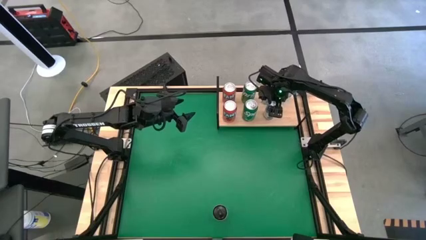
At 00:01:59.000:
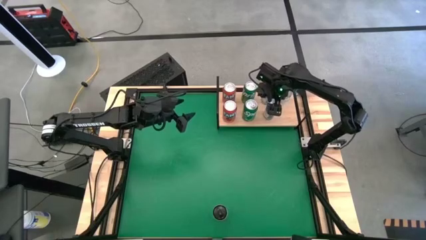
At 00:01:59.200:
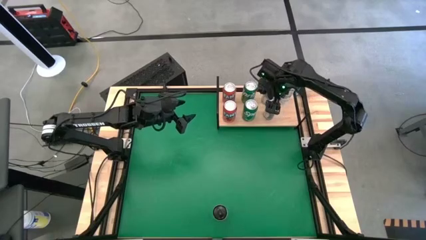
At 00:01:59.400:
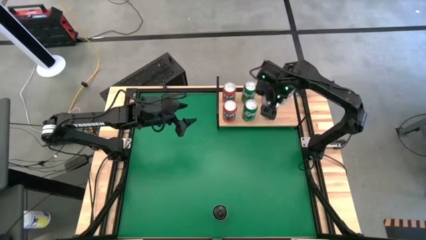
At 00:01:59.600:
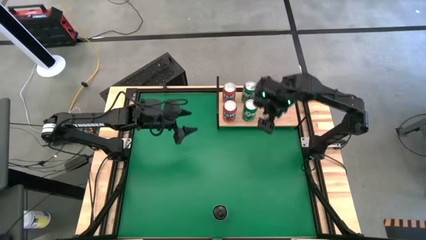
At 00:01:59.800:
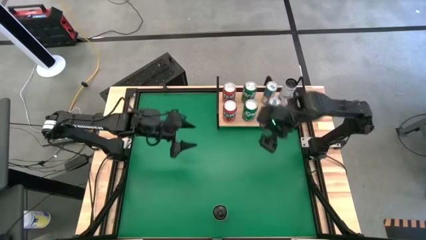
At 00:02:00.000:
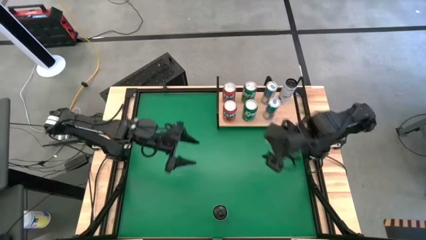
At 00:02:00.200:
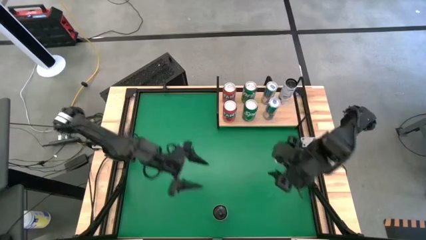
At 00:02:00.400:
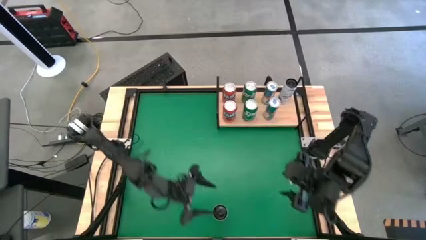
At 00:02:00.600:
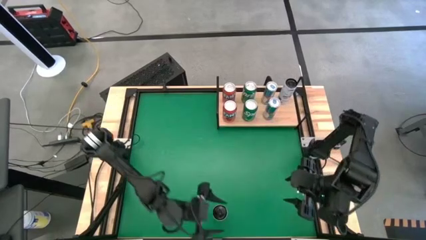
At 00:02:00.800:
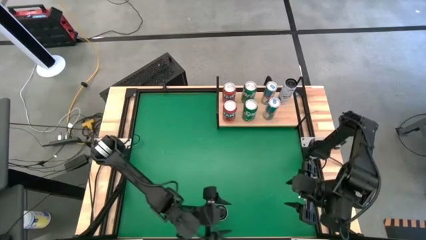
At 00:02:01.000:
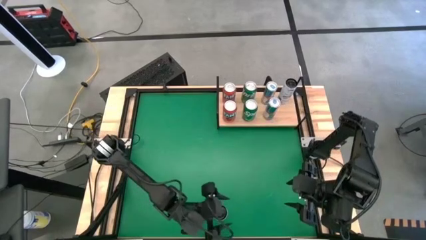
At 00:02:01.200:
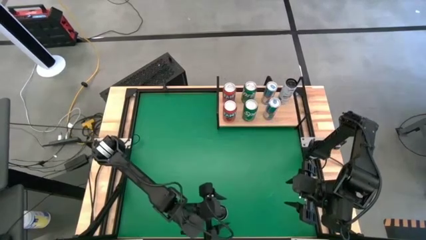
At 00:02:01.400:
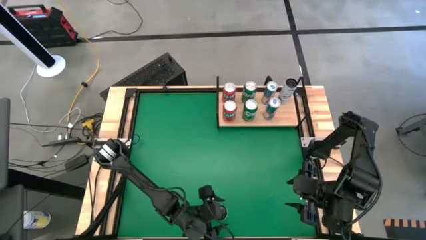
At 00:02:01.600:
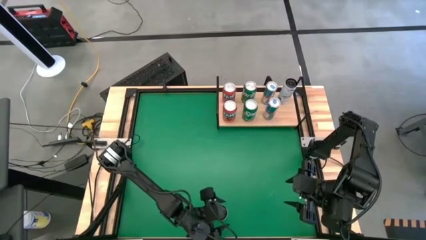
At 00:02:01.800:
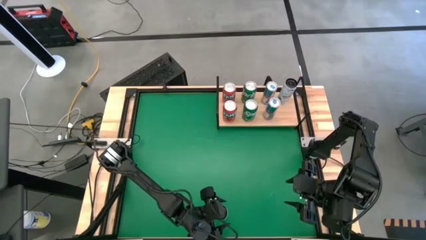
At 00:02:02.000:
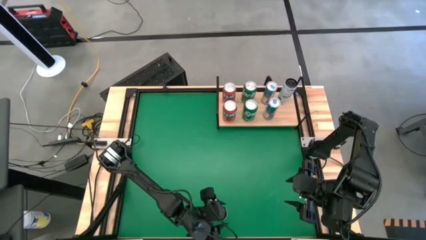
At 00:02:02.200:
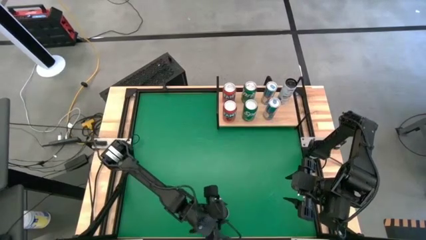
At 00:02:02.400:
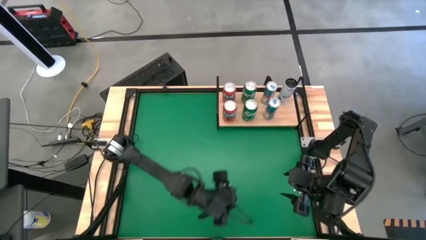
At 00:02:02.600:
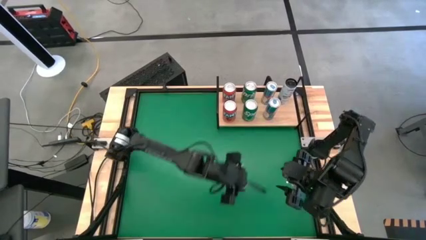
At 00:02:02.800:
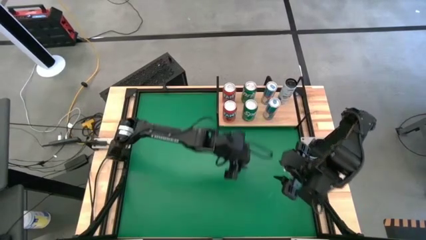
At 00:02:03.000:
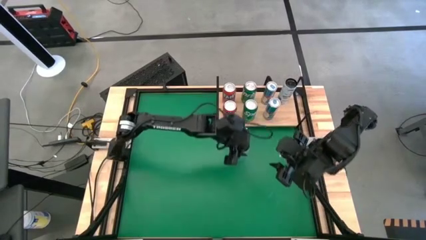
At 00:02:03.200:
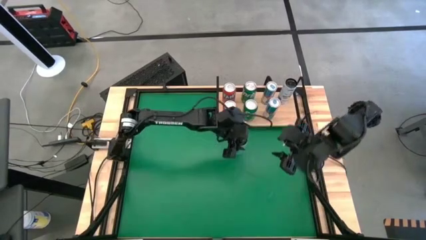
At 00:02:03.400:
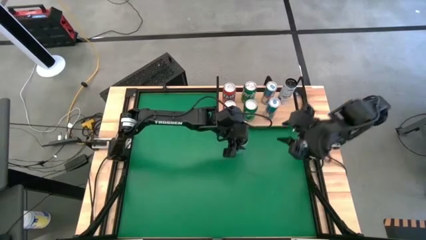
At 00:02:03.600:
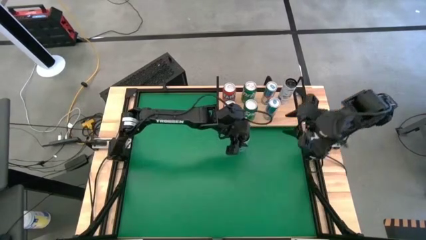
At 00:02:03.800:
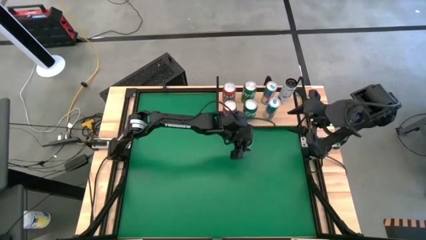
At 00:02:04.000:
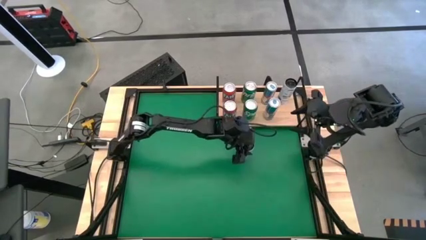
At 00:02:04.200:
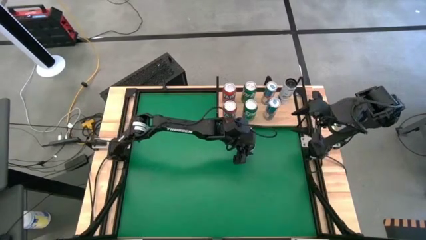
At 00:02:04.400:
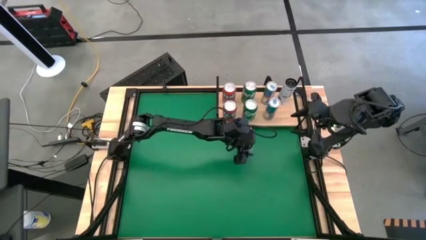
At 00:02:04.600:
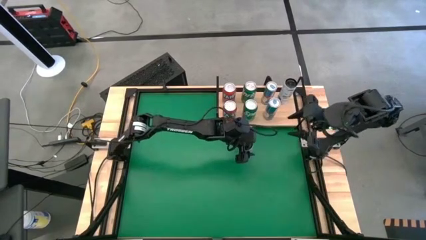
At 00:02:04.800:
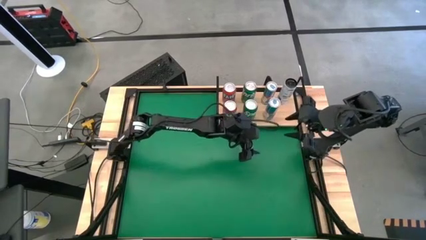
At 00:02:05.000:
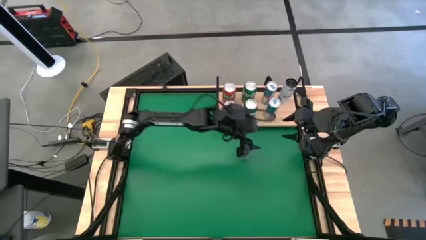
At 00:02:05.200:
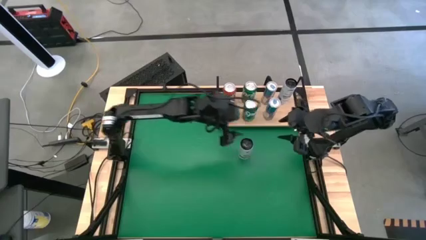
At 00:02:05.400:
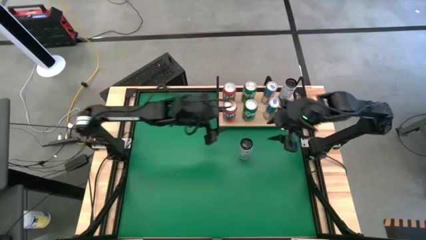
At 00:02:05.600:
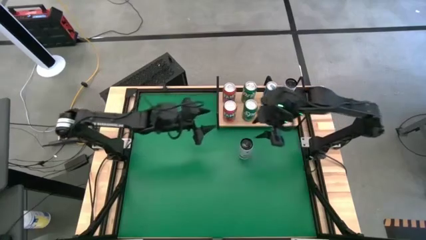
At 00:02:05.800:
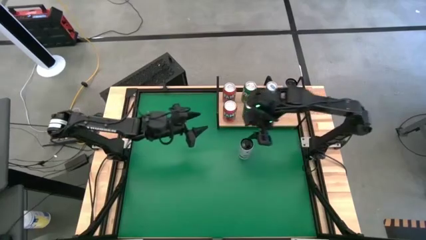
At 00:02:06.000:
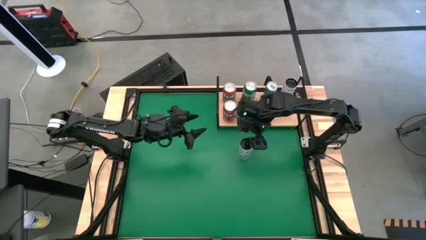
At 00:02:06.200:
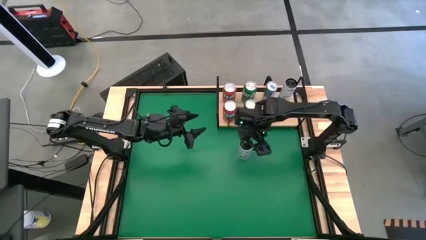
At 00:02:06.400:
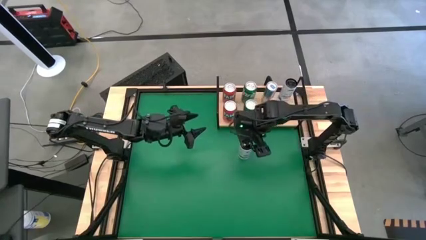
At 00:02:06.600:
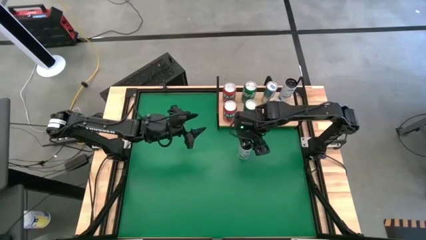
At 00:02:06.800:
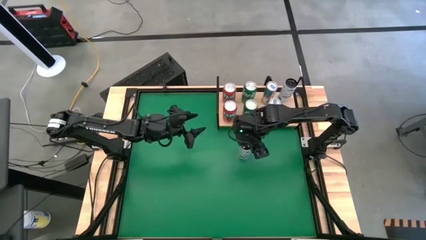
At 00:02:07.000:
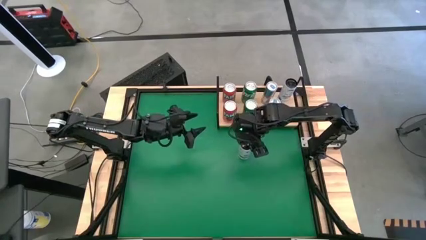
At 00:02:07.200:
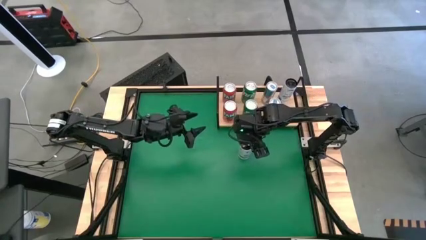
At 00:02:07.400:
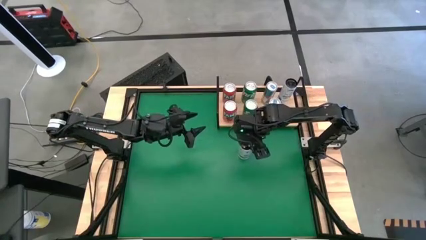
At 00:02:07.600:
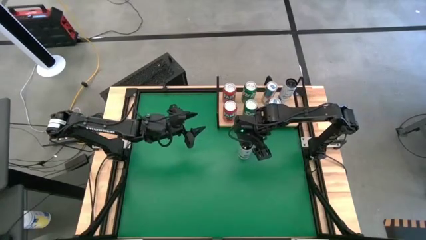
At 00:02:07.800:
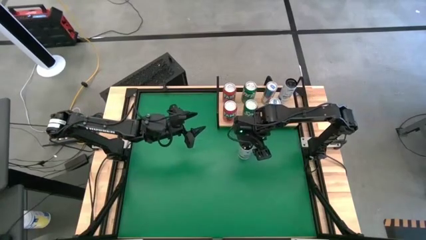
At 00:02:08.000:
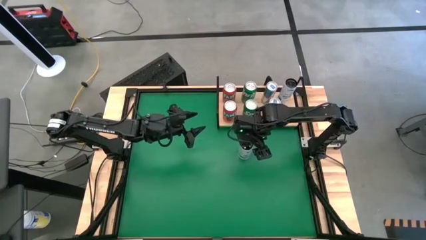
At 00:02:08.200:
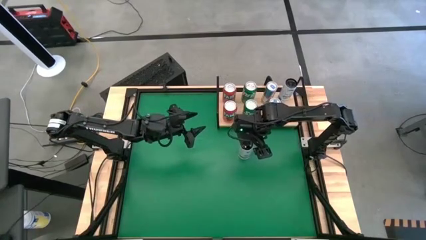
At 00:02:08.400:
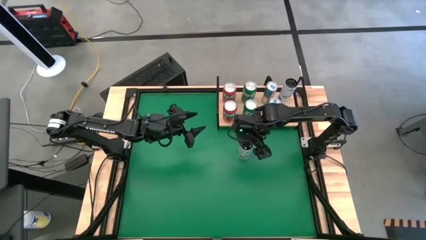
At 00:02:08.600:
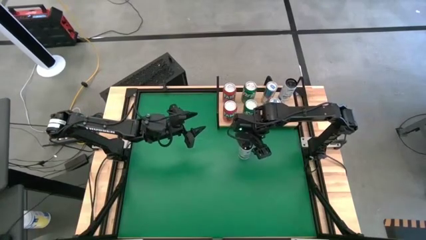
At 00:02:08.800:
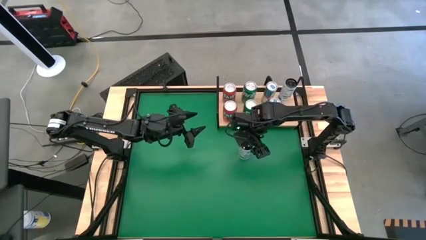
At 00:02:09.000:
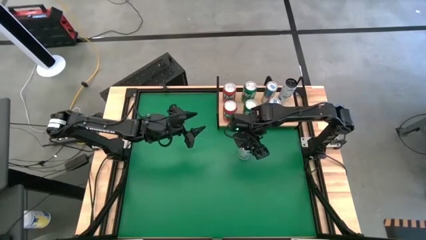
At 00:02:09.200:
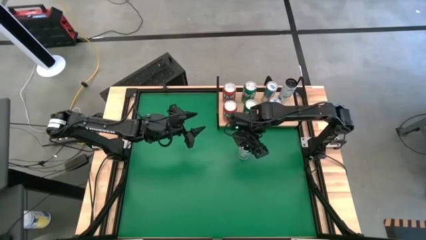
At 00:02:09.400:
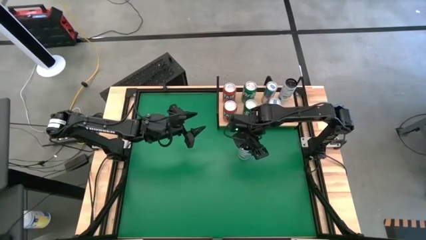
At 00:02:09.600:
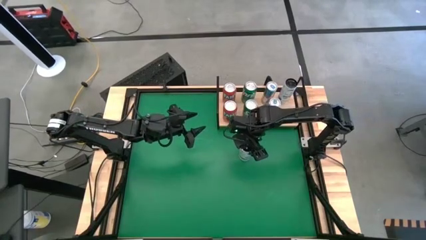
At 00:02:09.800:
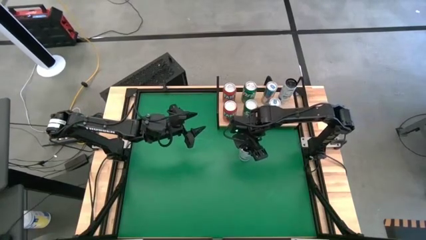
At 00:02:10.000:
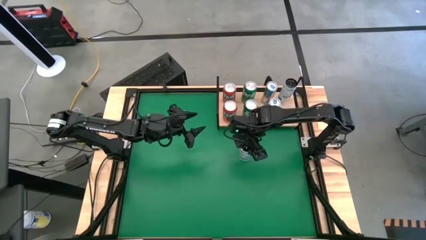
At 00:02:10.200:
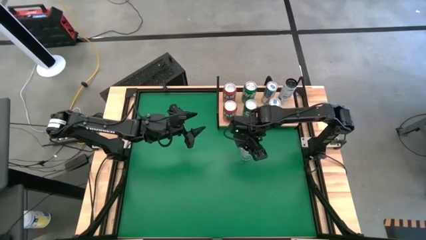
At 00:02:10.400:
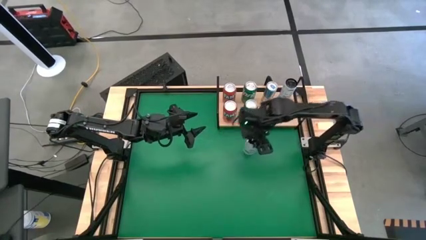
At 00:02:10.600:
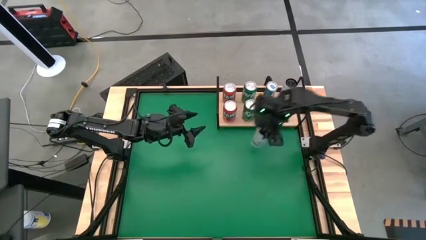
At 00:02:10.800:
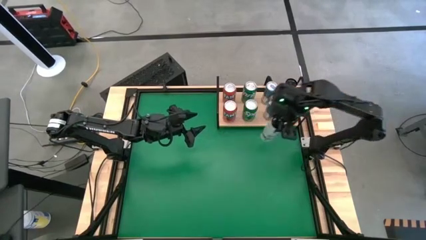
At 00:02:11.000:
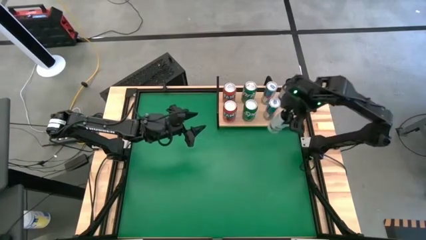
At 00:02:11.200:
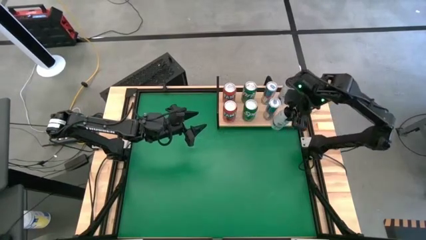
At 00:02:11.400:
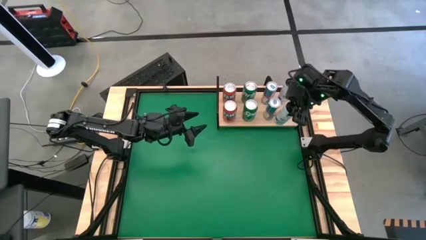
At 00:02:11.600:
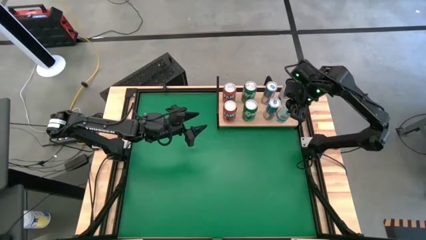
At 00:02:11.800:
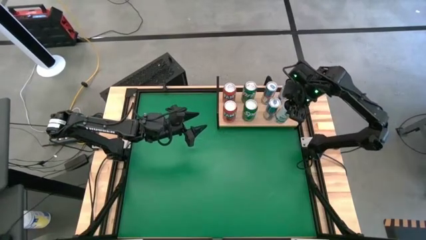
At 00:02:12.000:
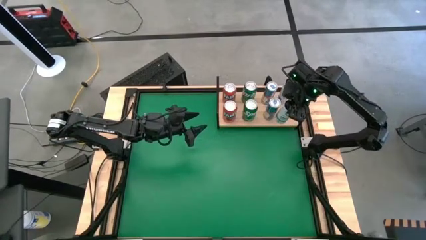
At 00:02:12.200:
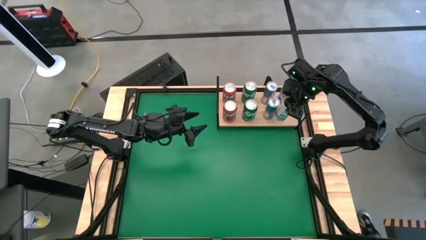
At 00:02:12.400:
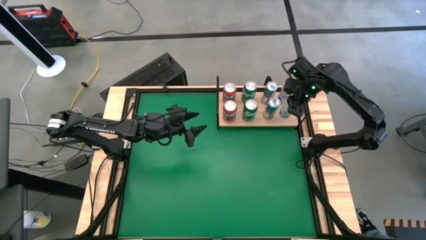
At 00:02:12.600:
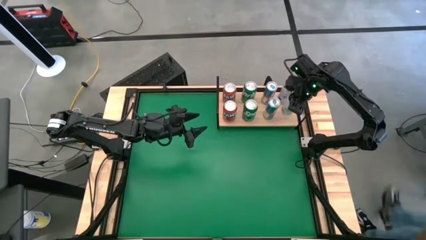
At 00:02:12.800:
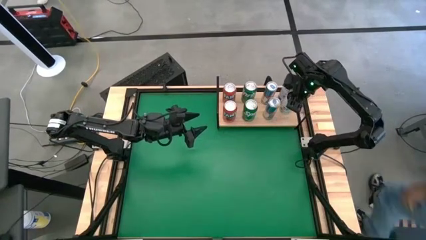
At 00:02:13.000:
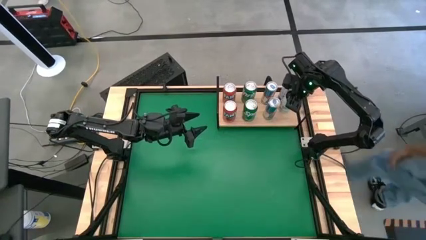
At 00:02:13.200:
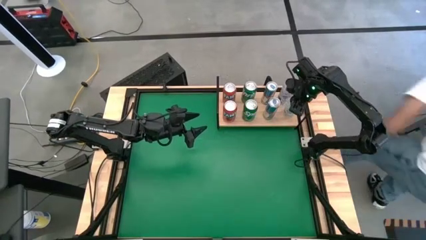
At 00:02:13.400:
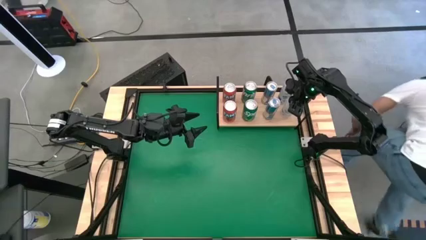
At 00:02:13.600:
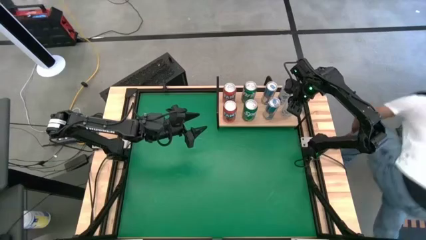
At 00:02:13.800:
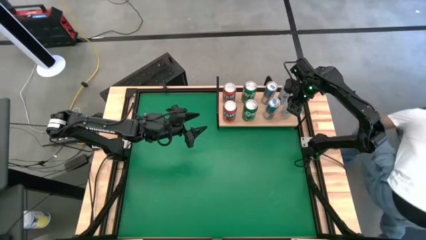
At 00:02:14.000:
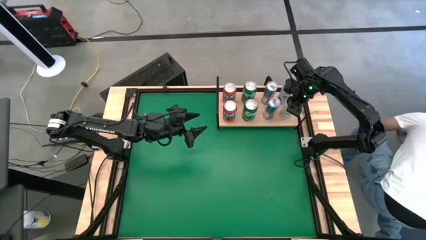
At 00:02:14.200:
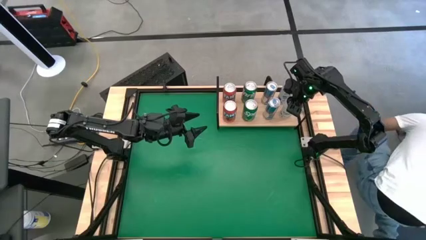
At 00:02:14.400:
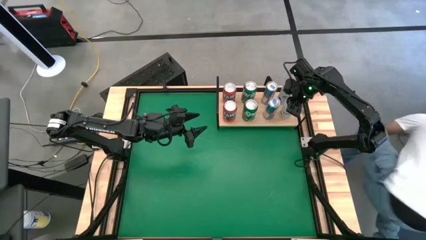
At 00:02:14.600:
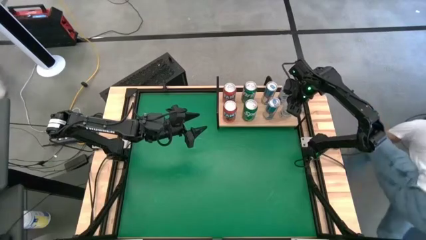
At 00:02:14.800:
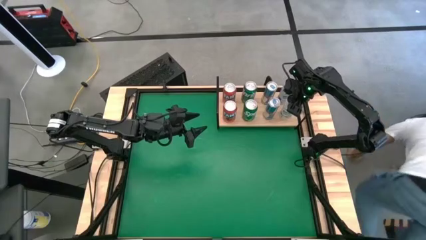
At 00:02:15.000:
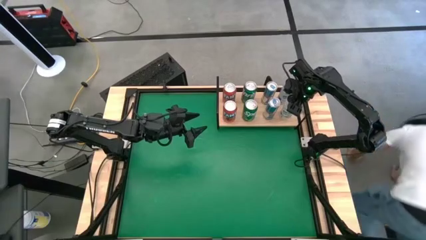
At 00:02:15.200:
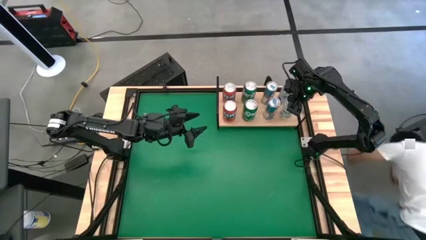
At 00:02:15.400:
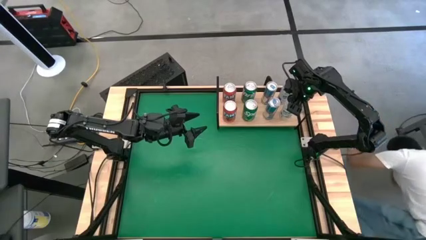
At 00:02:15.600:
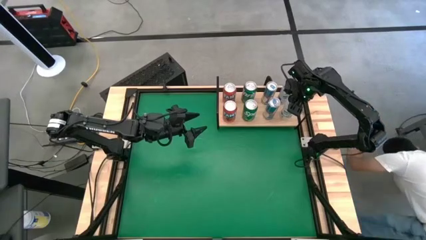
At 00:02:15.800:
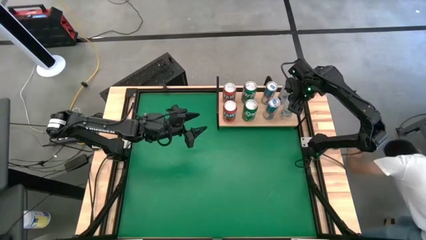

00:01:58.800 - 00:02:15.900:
Task: Place canned beverage on shelf
Put the white soda can on the shelf aligned with the other white soda can
